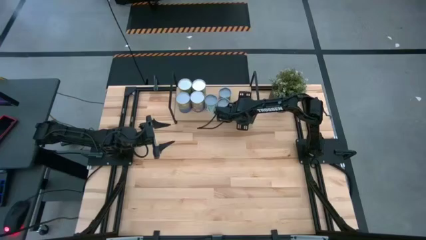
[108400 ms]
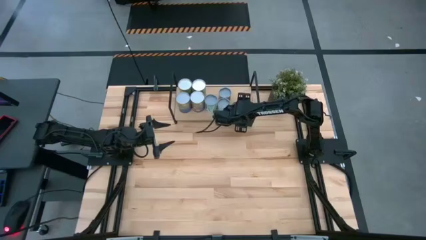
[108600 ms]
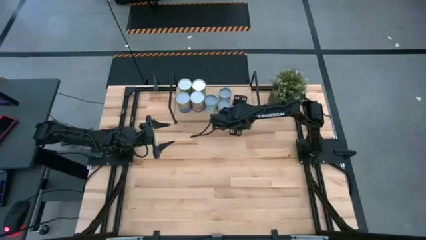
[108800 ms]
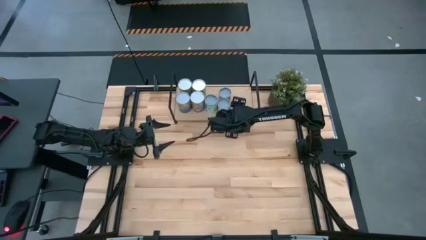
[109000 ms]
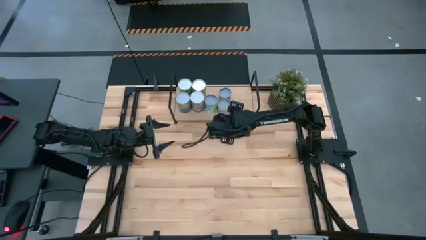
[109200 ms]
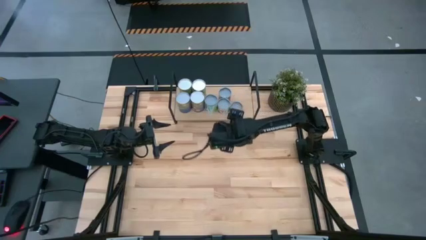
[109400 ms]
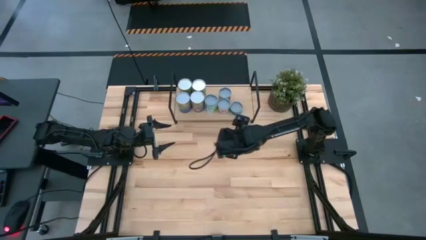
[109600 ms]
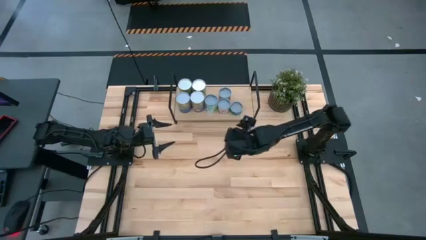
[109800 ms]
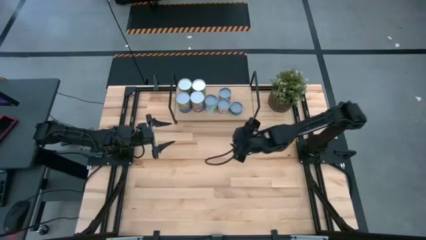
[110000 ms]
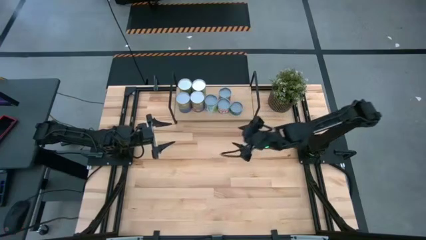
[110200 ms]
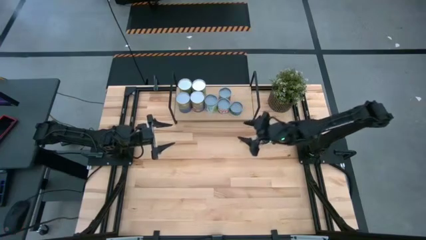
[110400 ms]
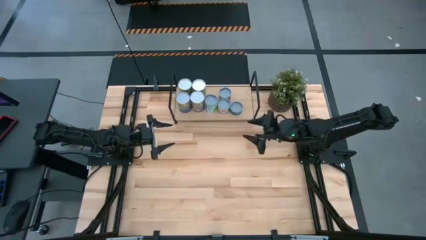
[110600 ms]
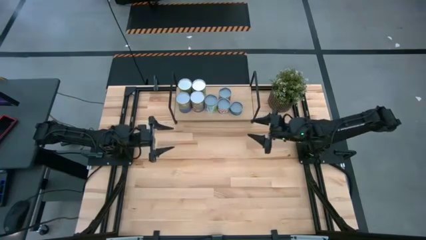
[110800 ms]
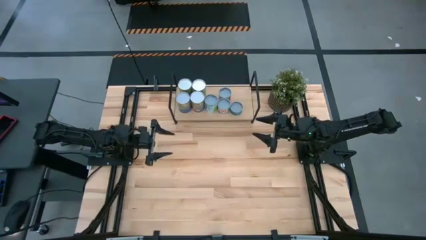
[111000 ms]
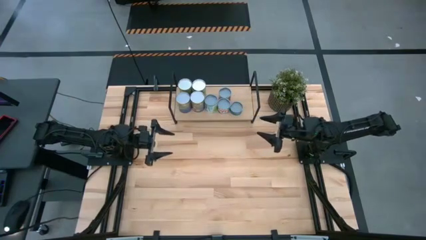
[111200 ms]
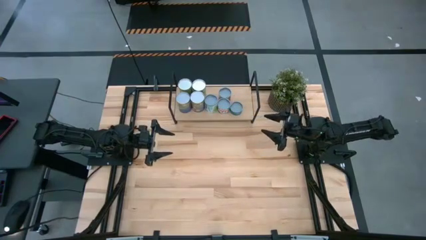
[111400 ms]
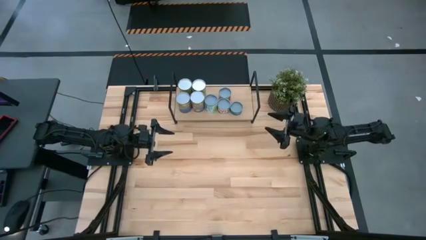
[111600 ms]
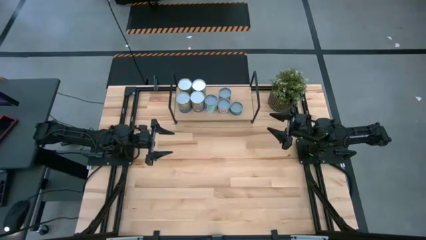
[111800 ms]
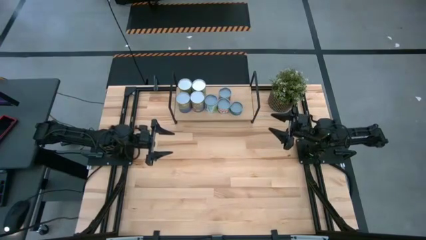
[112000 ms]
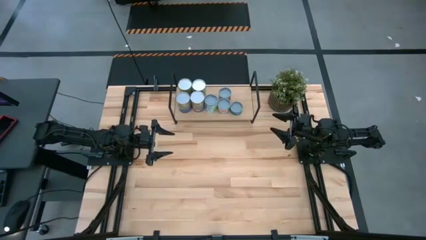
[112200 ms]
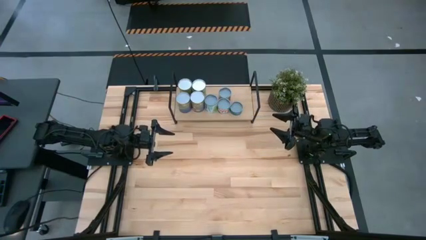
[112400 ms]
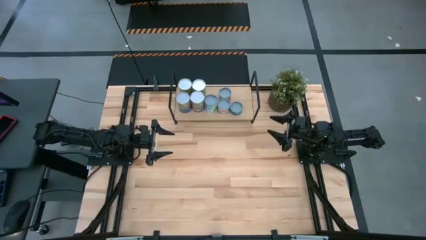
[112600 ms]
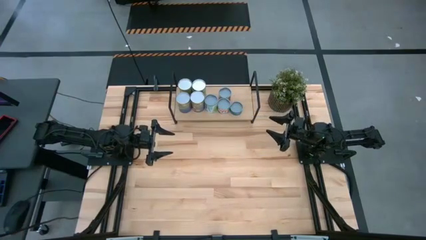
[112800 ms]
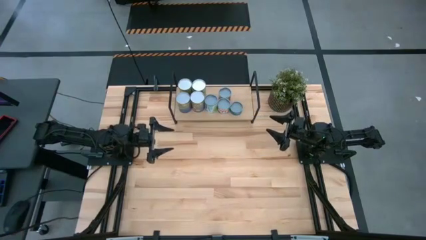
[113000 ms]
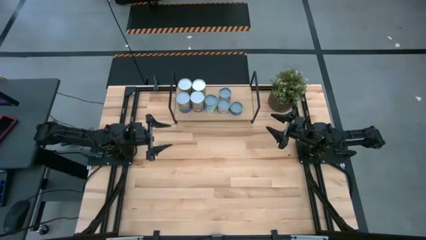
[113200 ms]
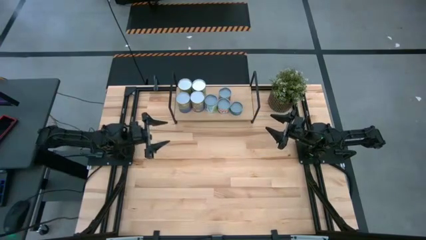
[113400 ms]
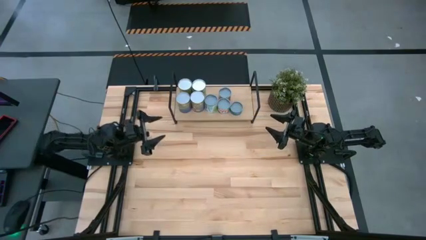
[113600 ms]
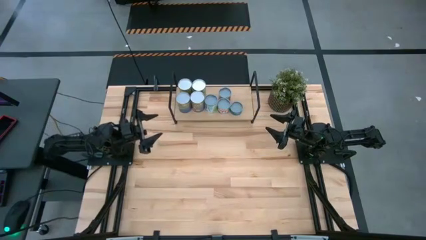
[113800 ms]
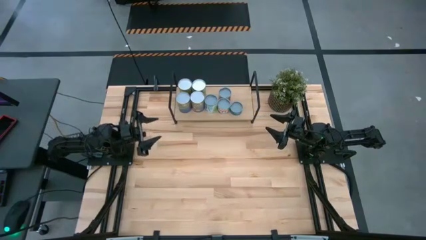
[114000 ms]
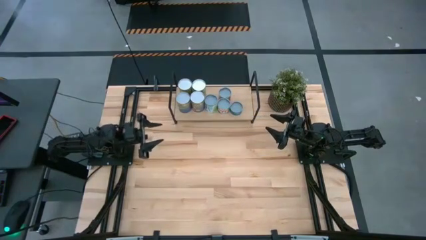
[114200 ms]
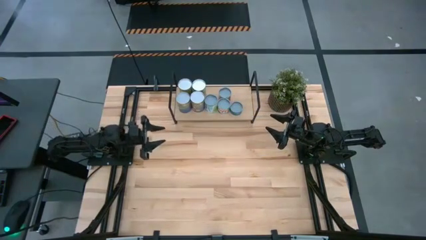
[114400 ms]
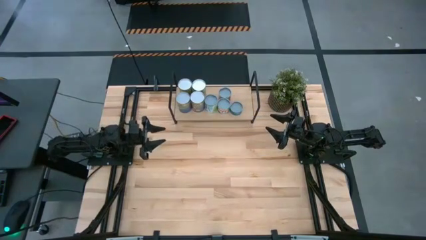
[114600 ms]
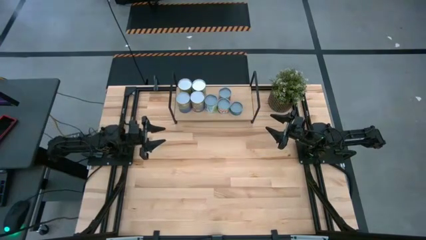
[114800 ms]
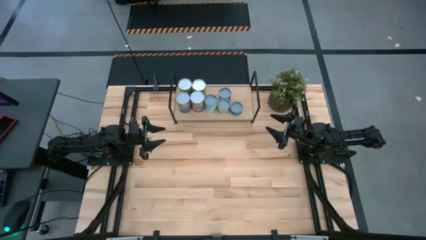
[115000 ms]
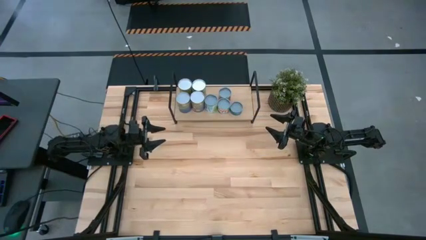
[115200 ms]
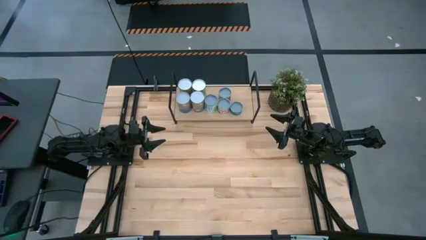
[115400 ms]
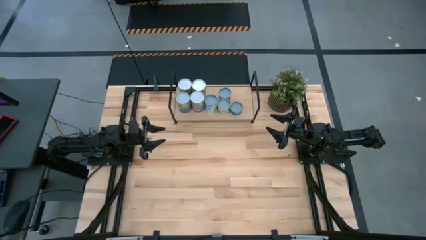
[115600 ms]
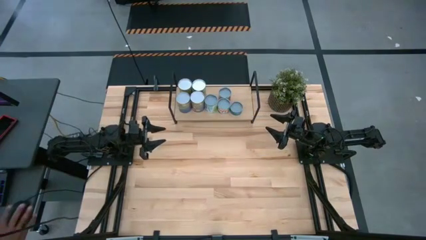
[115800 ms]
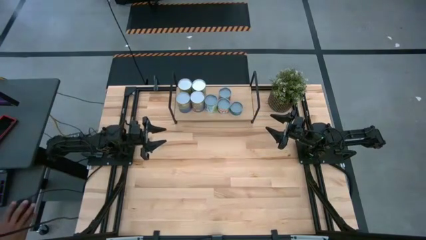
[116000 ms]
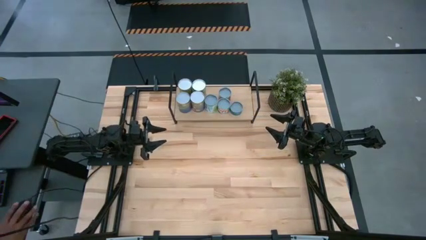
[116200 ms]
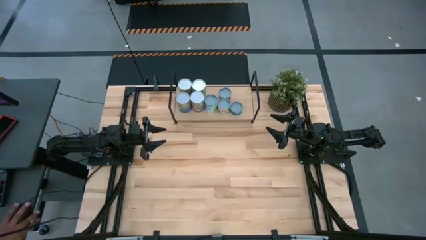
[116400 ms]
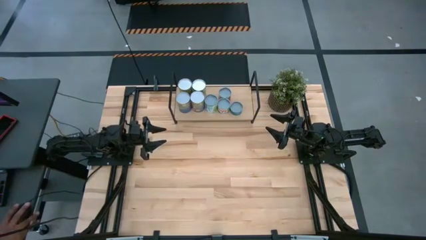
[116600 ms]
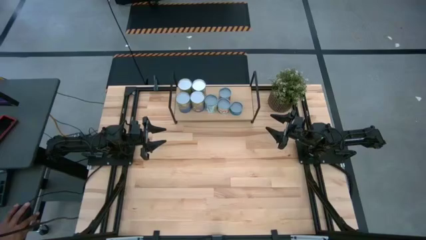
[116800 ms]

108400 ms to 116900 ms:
Task: Pick and place cans onto a shelf
Return to Home Position

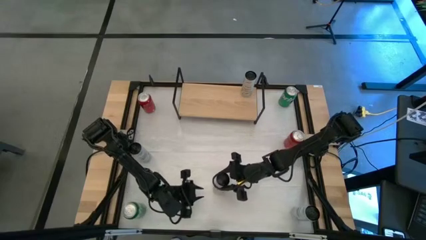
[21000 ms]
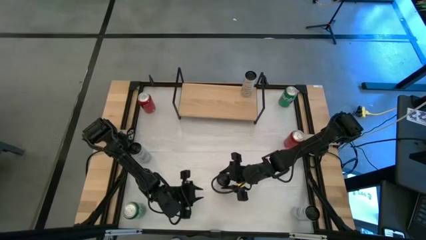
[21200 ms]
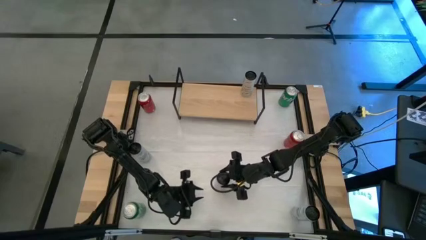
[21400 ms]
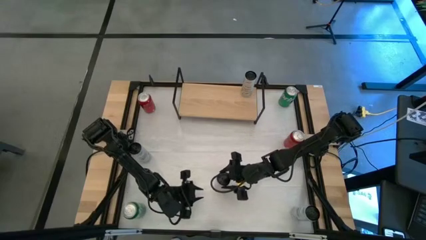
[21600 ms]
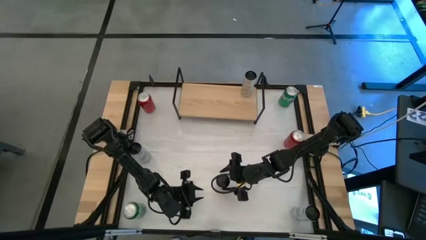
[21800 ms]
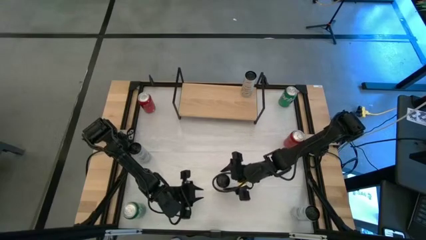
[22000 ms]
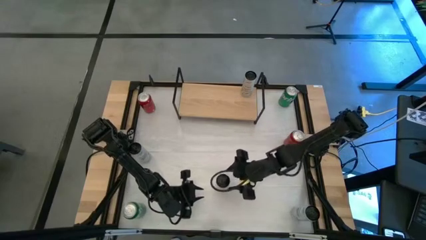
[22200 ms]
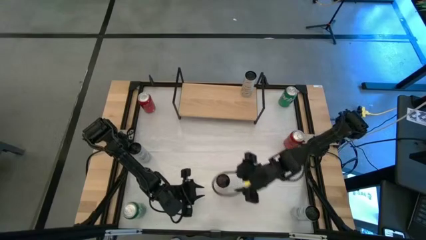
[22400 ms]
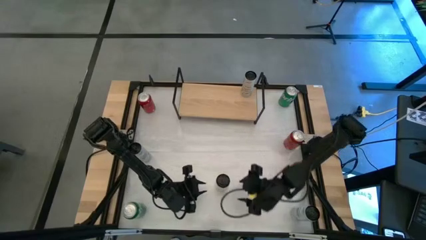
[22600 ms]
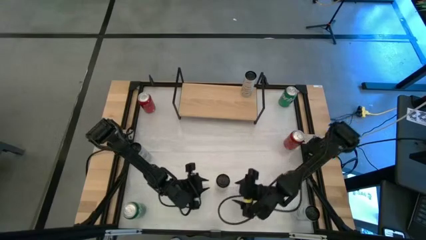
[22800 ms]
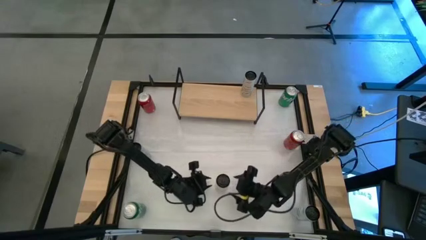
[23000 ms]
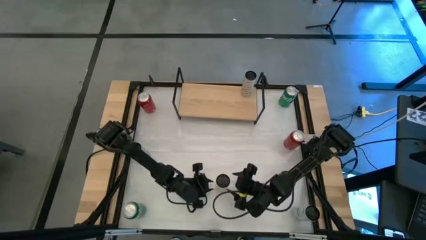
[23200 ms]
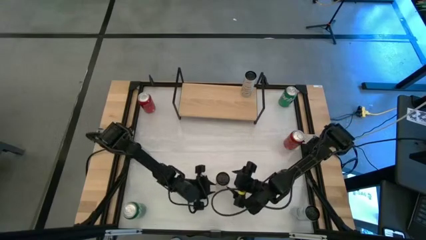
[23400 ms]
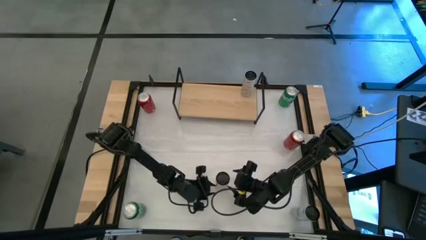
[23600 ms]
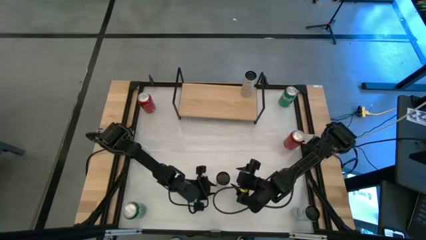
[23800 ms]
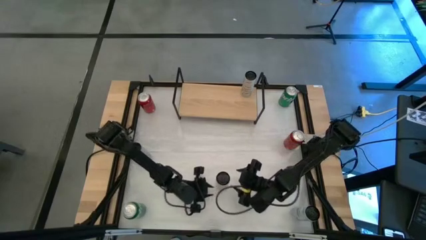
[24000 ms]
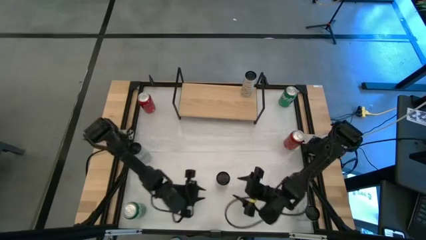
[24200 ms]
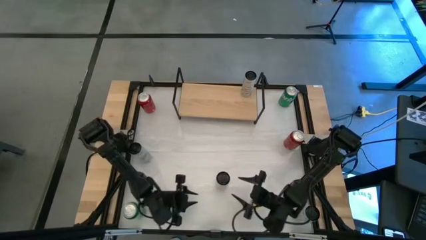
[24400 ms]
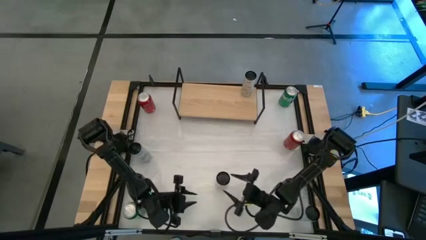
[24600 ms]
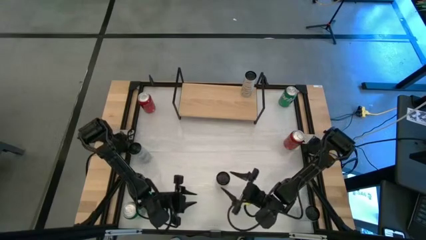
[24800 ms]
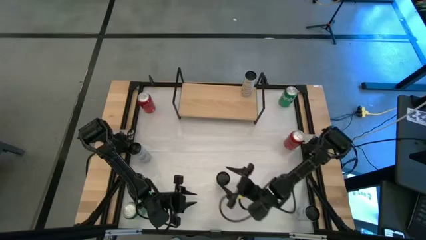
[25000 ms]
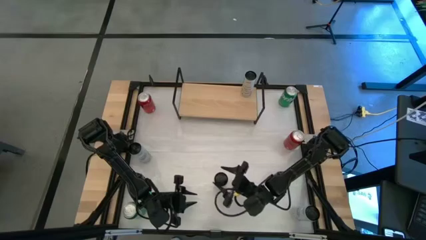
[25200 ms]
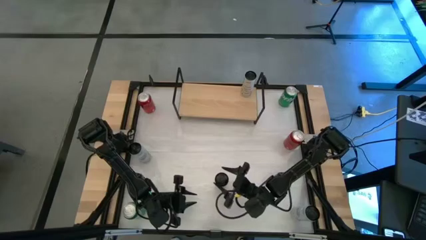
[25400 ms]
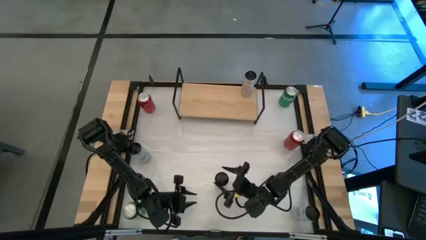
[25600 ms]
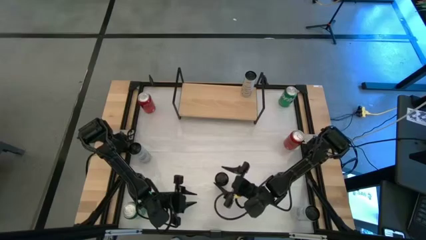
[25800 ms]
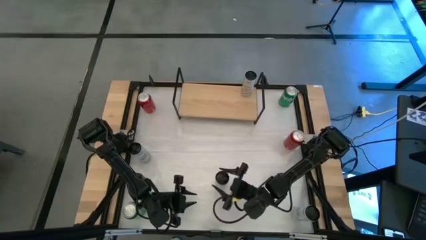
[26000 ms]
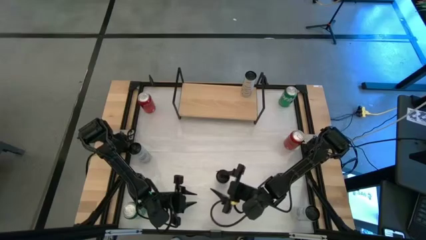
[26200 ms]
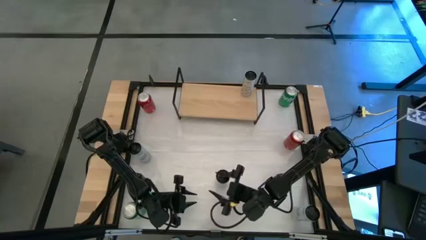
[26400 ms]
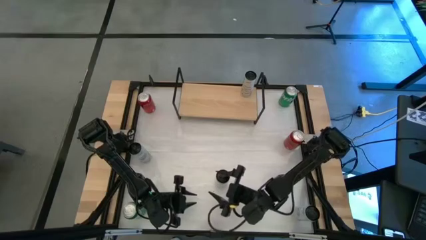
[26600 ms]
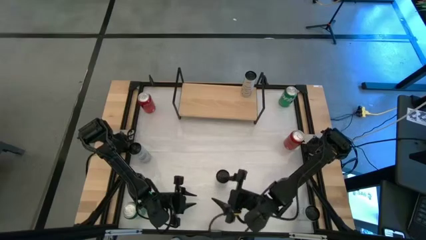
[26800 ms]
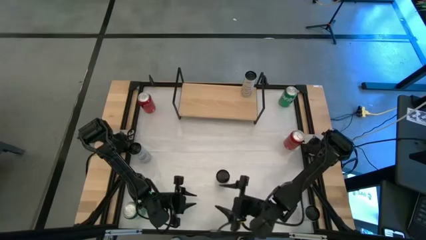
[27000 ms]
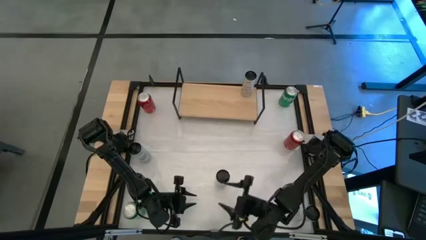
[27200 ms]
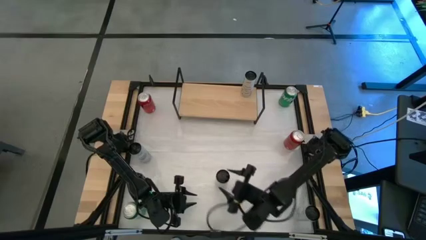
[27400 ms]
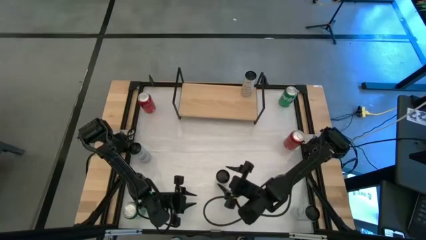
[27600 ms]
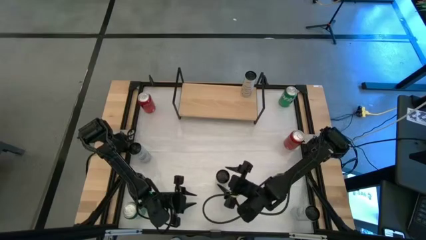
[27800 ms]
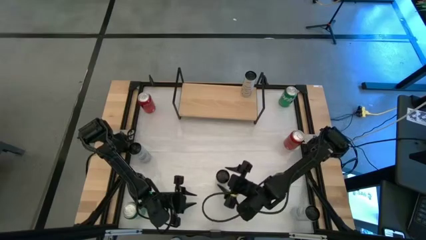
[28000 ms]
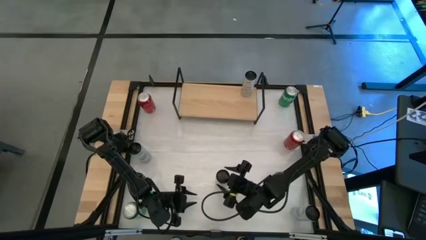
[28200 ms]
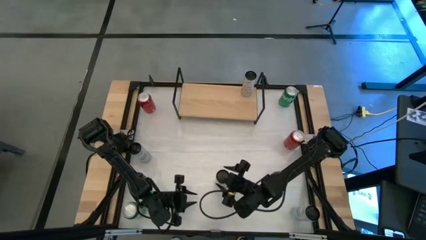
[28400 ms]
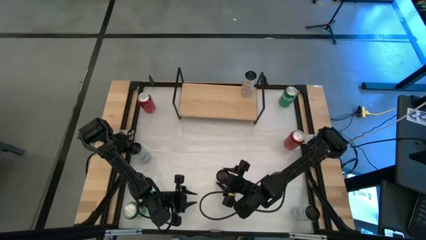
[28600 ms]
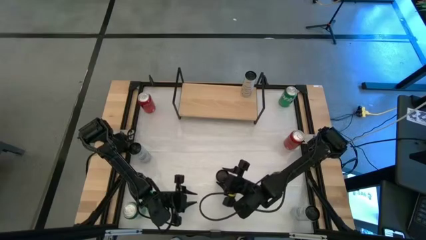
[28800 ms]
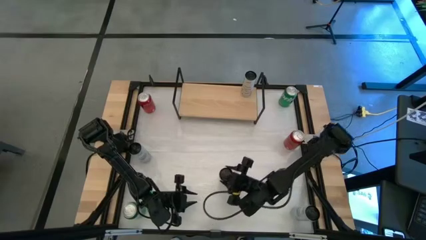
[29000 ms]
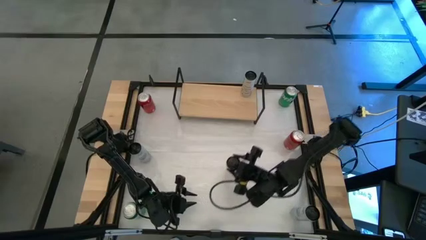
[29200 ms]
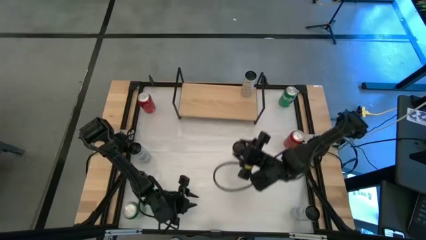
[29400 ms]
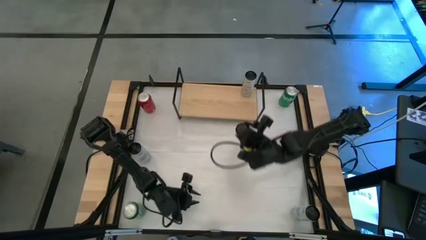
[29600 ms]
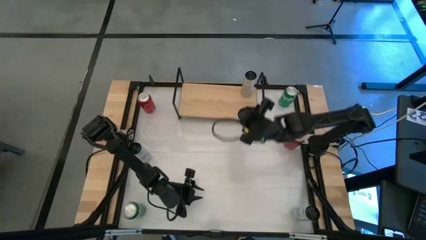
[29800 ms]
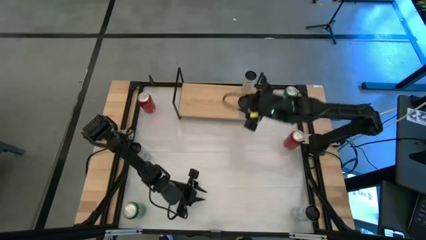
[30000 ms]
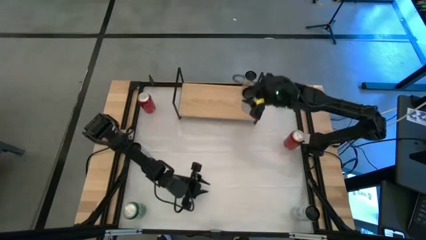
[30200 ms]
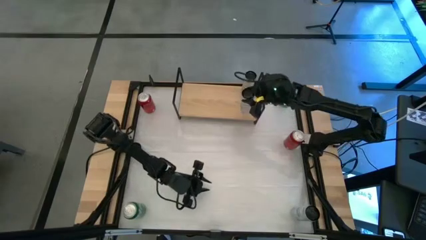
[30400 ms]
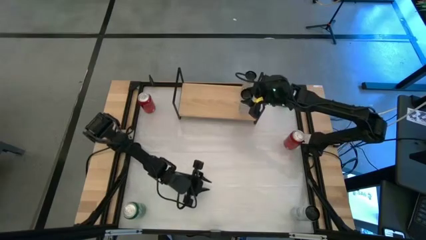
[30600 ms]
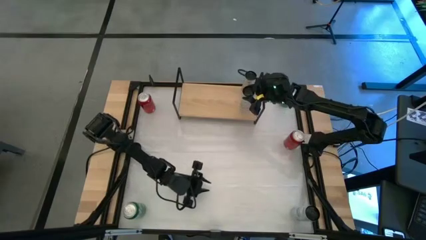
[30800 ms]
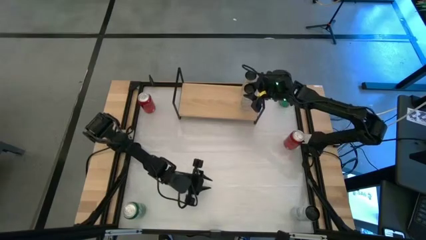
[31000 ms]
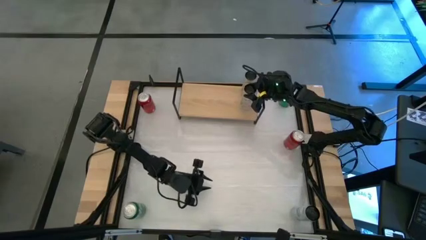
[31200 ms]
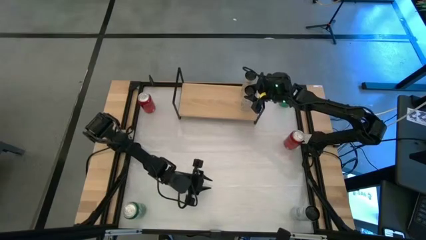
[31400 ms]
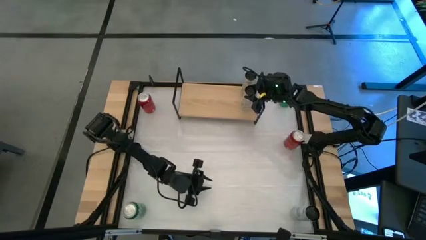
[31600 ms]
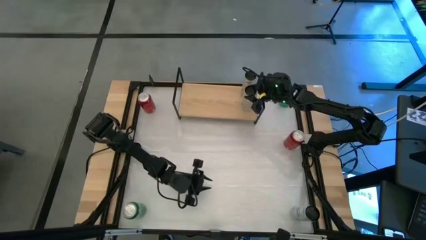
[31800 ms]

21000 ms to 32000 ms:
Task: Place canned beverage on shelf
Put the white yellow soda can on the shelf aligned with the other white yellow soda can
